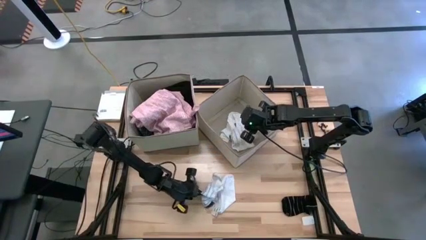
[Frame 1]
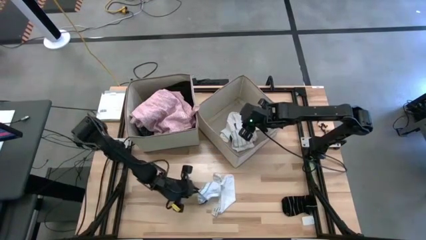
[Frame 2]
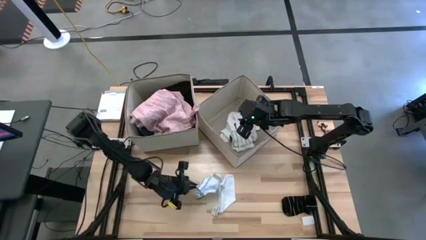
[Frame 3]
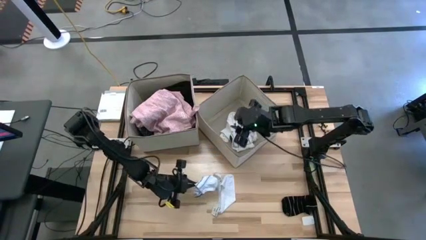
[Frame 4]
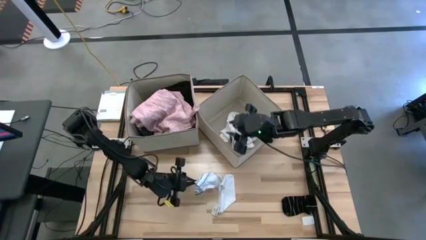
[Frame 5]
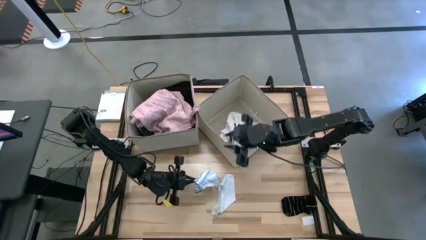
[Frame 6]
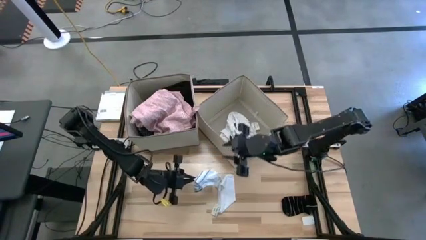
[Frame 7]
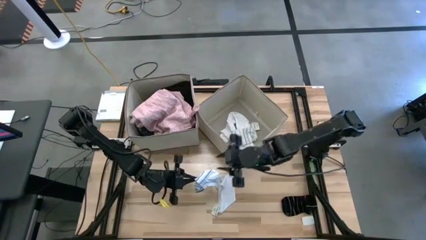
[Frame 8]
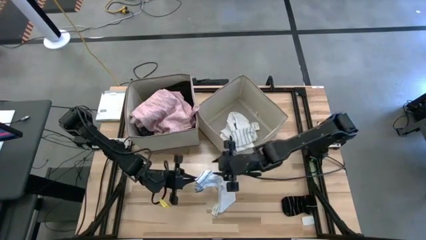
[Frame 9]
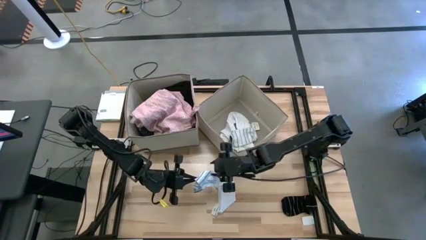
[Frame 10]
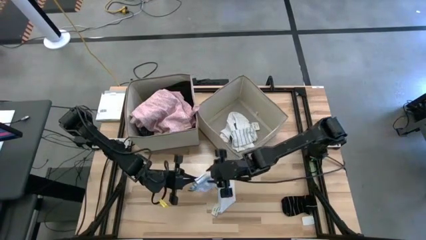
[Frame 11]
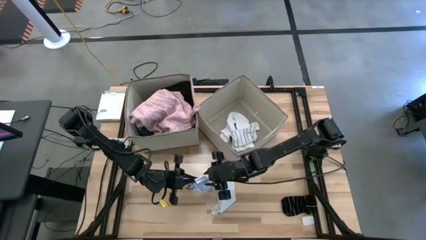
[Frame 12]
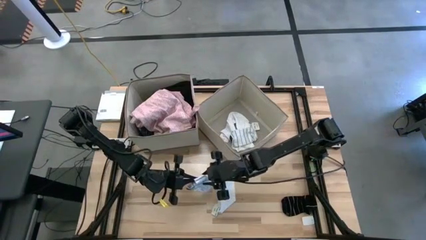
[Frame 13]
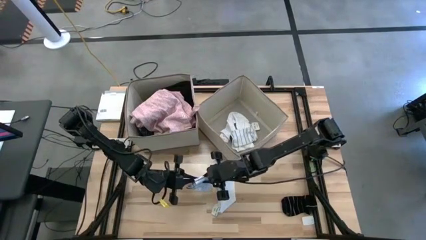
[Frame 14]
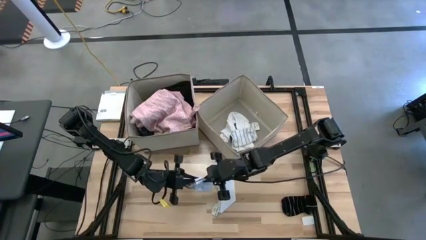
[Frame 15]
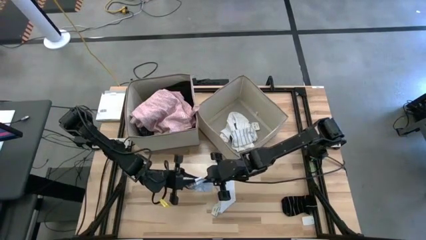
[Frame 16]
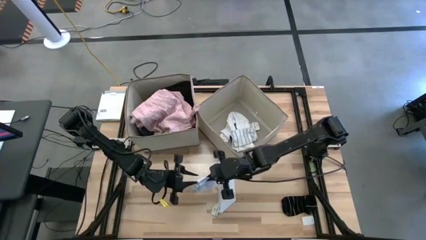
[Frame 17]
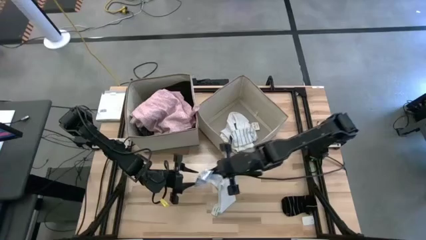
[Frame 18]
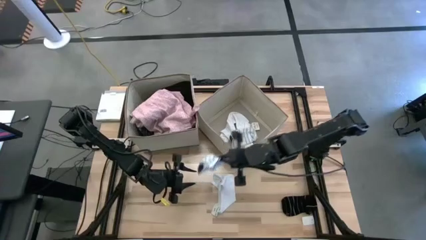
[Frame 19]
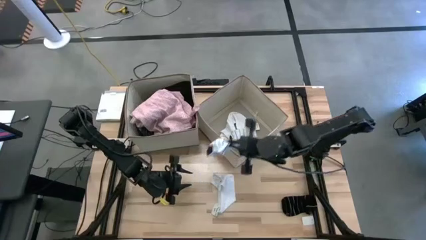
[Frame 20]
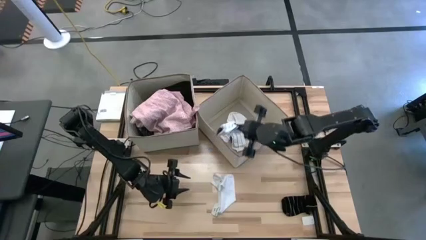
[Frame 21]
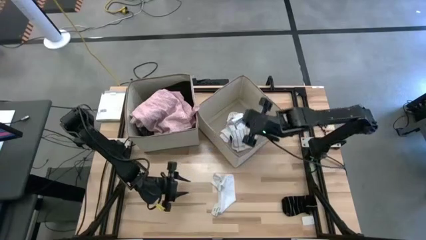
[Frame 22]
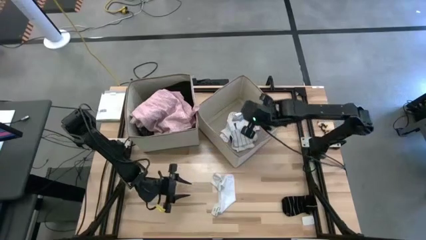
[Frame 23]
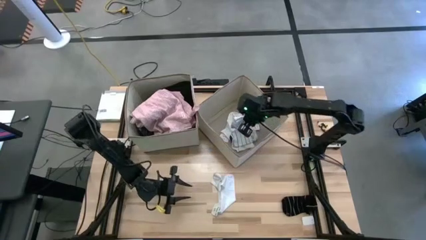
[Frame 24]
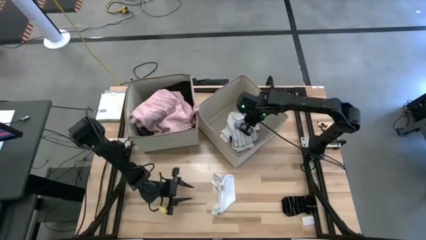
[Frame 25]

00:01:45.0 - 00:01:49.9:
Task: Sort clothes
Put the white striped sock into the right laundry organizer

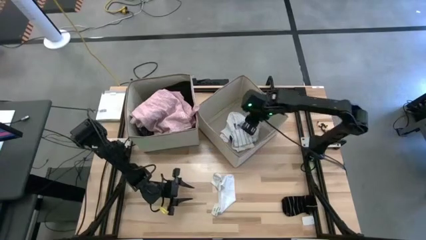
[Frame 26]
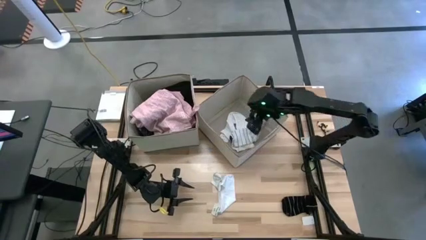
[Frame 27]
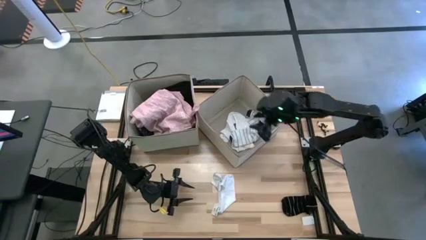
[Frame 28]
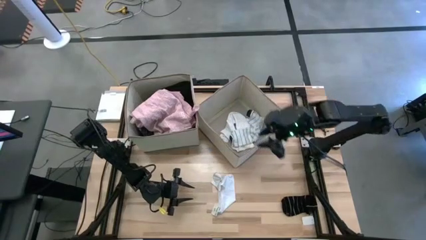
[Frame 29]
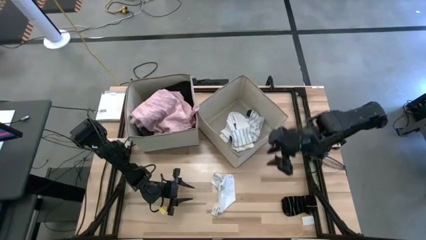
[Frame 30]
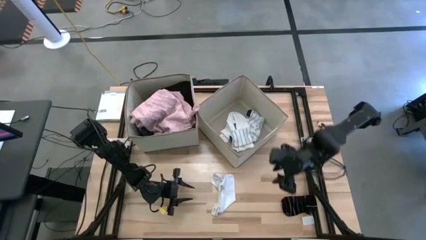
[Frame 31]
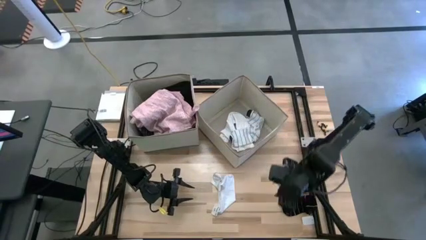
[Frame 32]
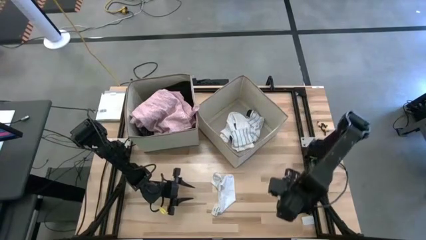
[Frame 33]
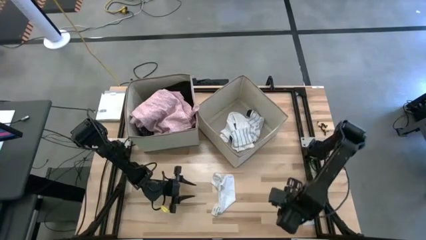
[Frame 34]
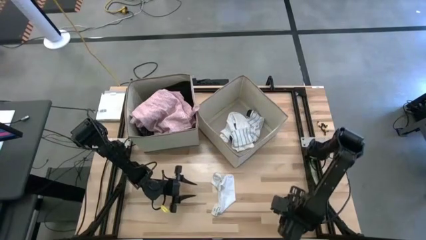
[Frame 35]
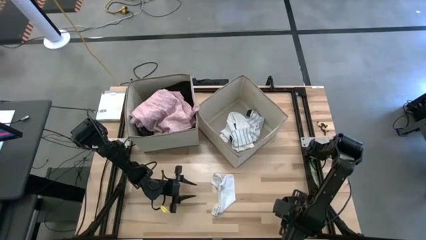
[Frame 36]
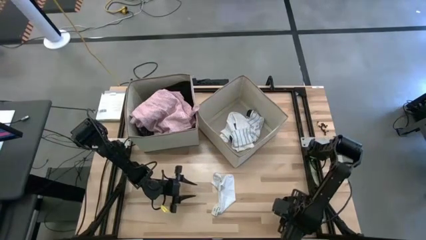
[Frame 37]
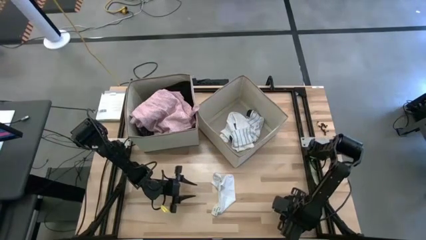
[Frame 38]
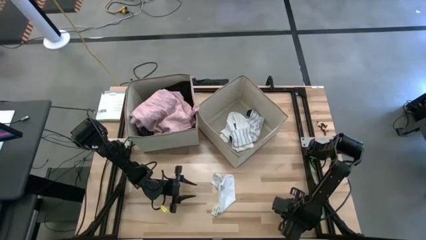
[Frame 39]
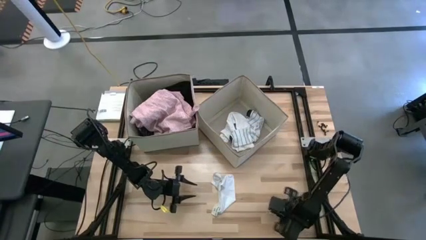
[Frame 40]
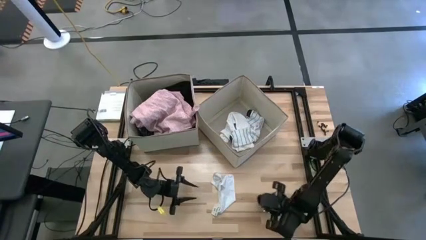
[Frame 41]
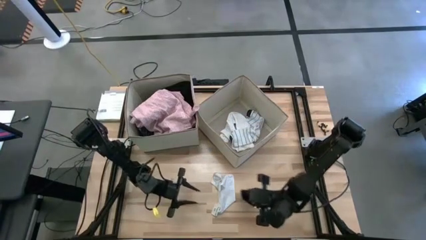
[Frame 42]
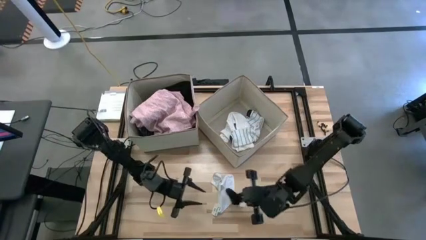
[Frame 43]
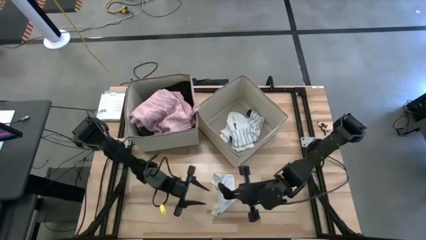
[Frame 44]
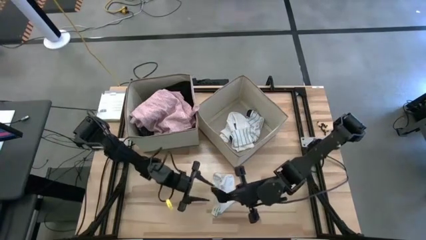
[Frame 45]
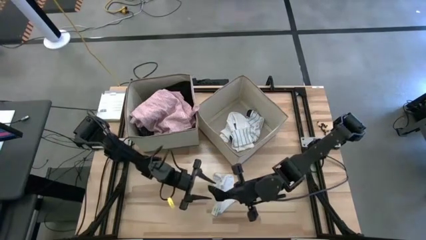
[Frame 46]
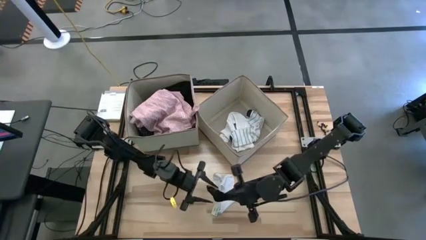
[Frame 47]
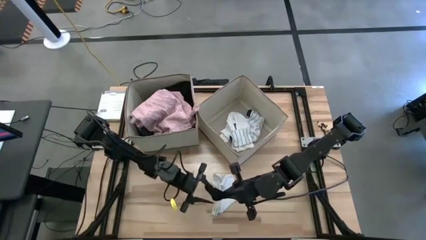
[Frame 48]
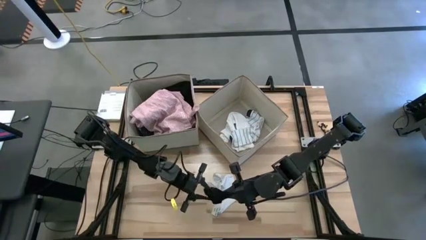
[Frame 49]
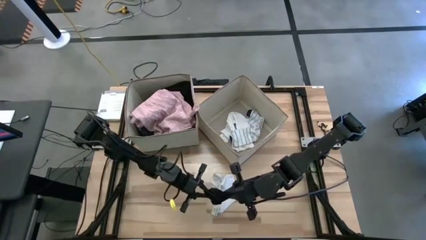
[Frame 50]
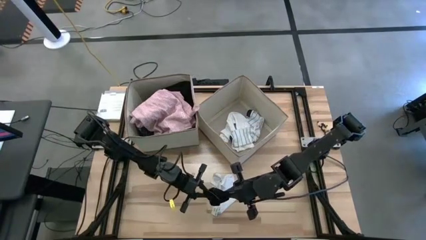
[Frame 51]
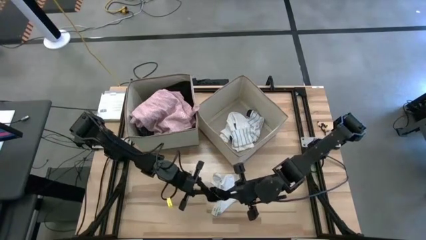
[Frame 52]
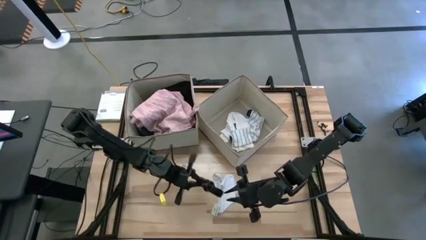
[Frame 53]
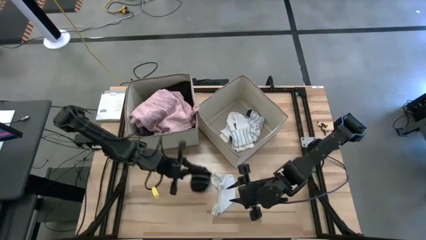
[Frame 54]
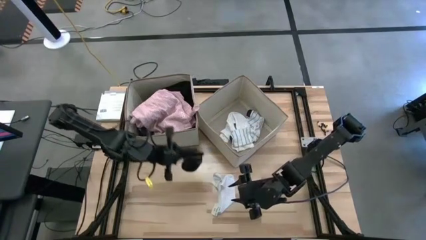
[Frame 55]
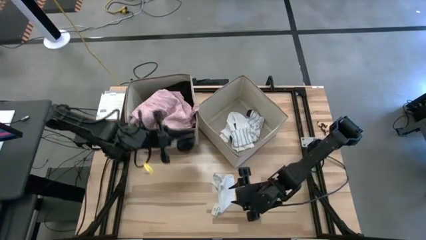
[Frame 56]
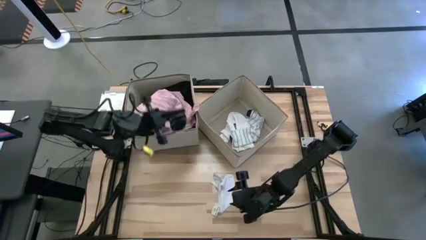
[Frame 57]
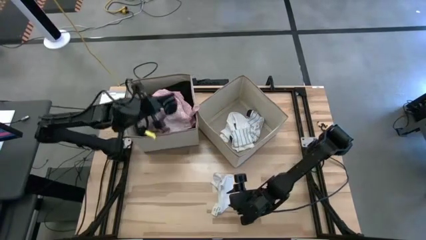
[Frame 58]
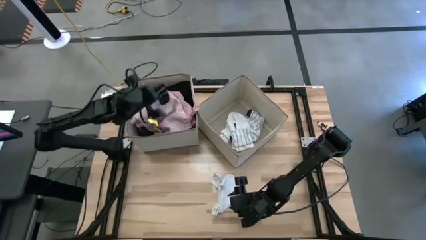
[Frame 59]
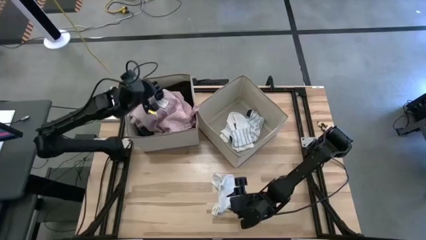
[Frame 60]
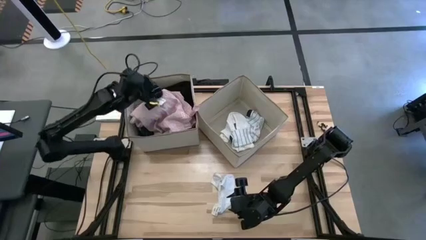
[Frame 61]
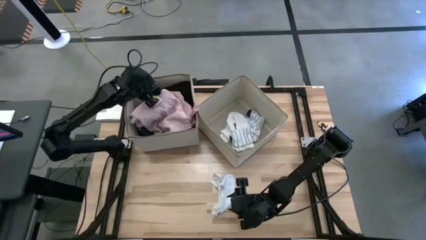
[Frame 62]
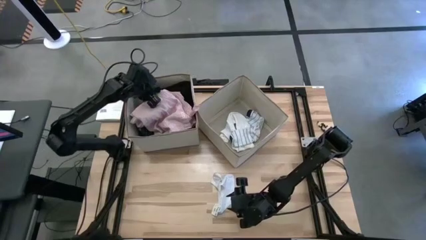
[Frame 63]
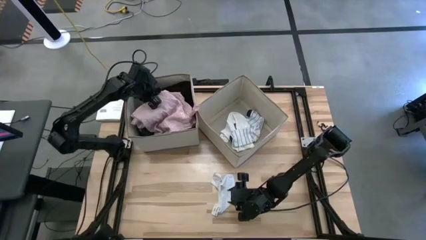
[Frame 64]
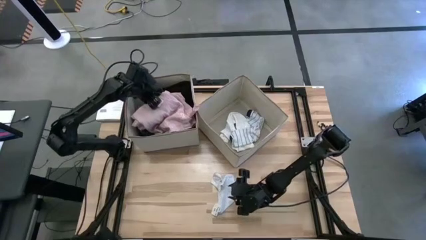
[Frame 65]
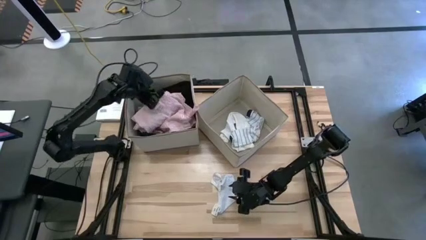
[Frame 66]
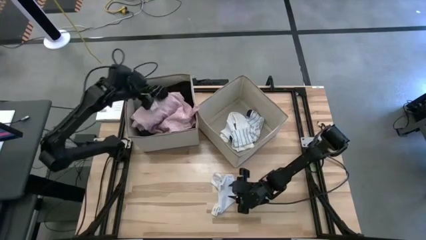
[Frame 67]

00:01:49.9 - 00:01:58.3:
Put the black sock into the left laundry organizer

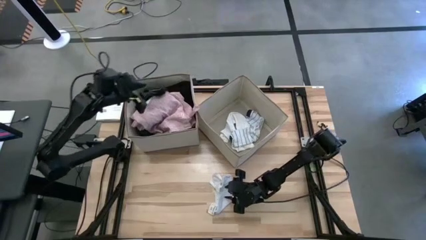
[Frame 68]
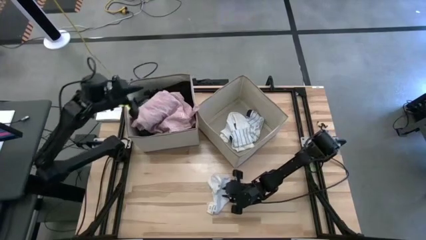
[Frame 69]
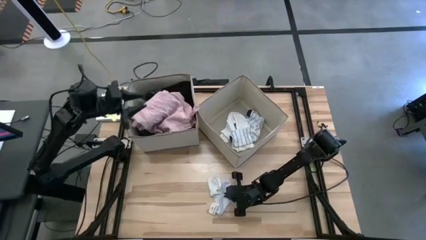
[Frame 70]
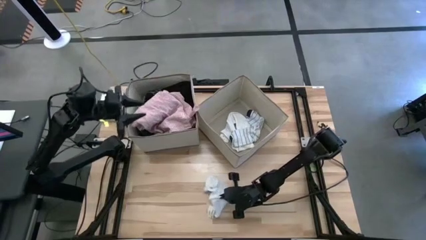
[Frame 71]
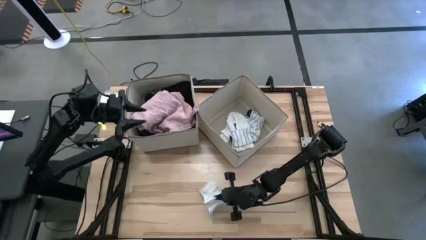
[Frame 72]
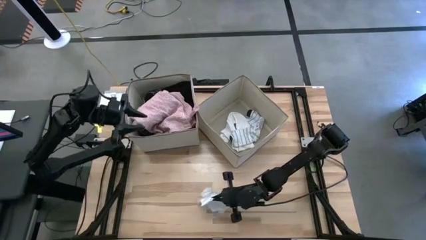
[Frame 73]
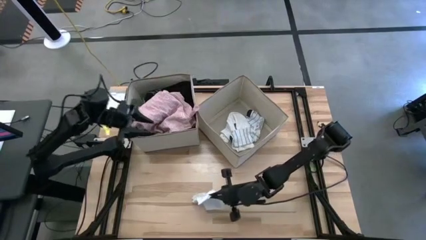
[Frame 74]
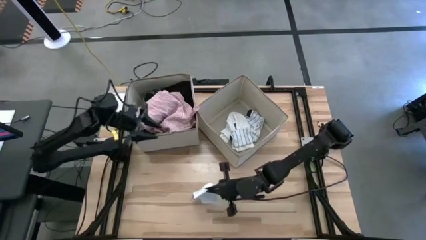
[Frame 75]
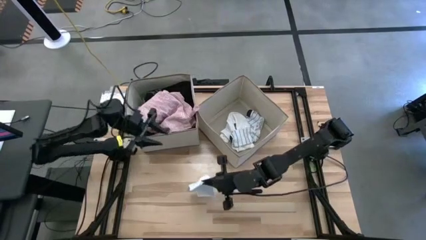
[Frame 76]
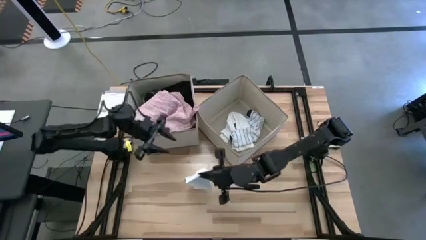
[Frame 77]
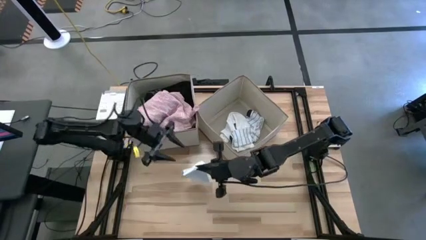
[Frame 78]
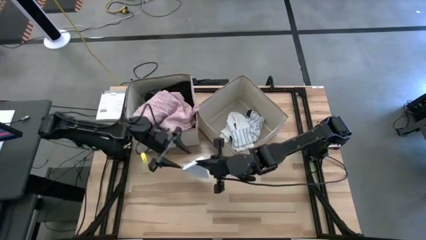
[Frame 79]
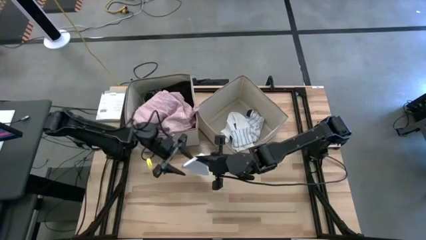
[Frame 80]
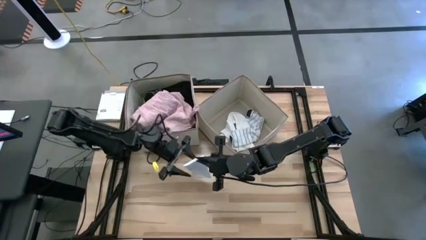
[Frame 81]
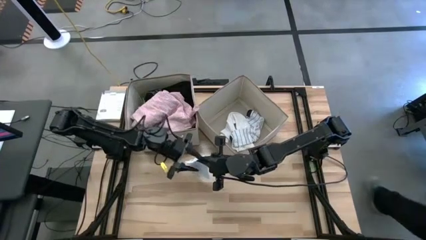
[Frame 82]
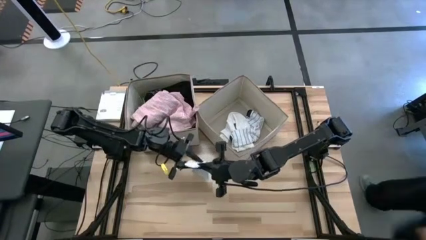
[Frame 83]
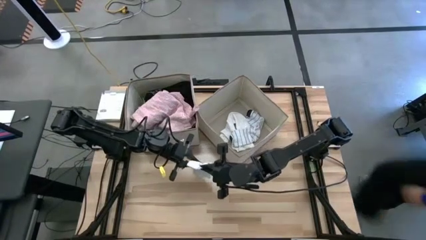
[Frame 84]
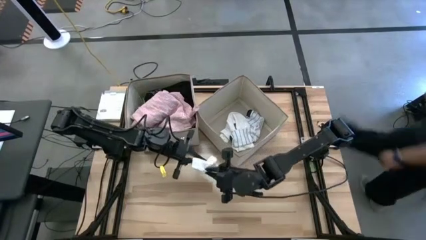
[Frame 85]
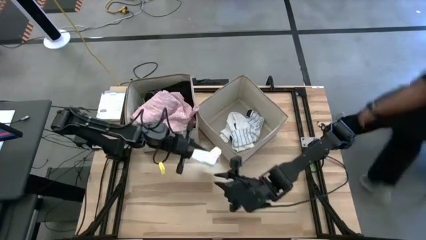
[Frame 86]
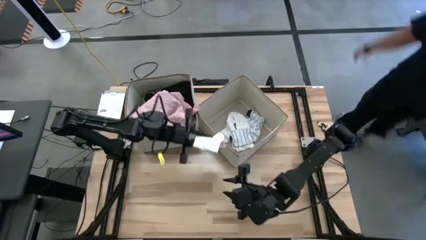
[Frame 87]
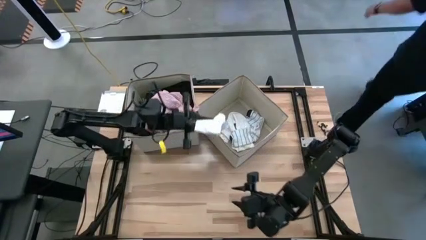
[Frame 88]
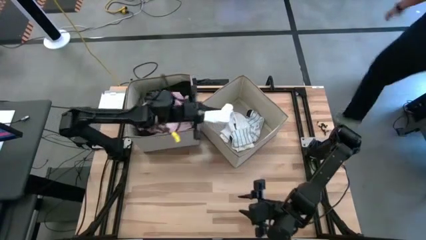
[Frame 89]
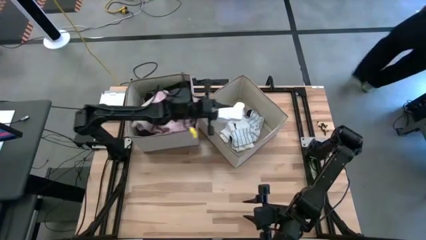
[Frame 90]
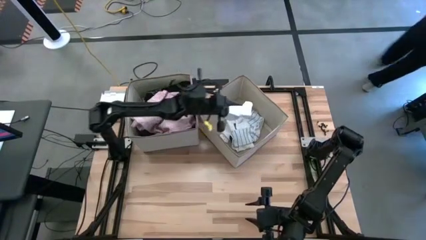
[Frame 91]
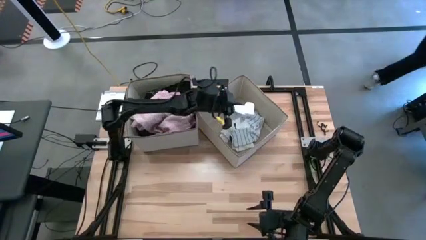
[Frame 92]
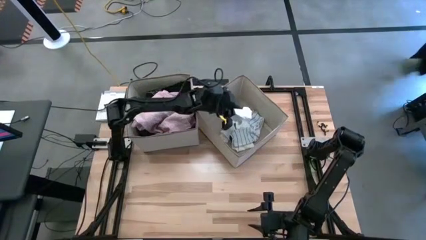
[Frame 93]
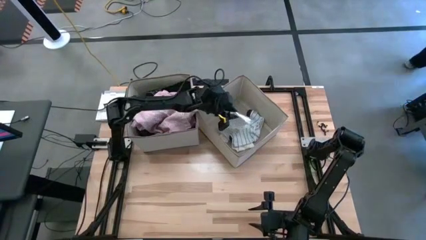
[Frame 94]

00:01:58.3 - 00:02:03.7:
Put the white sock into the right laundry organizer
